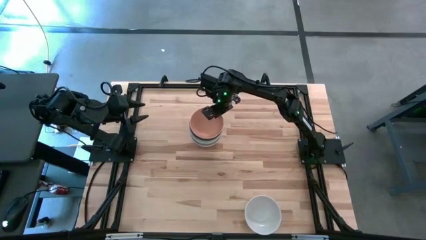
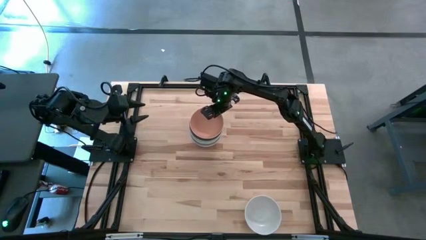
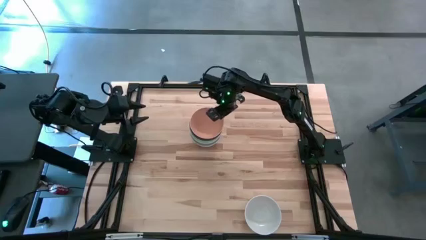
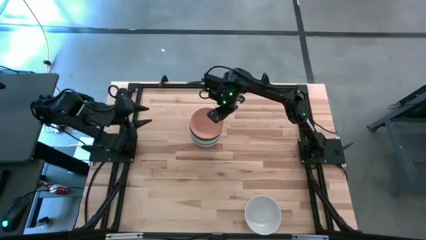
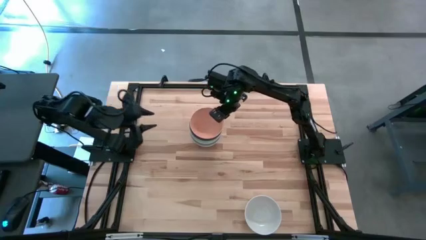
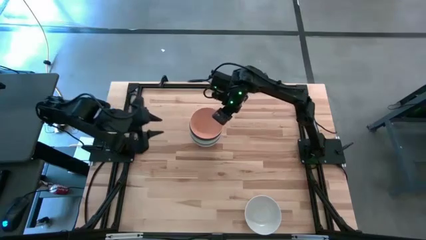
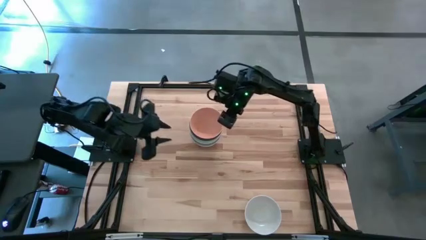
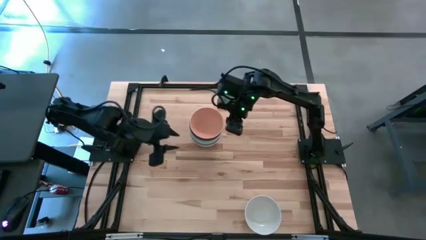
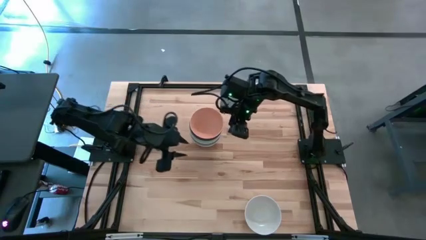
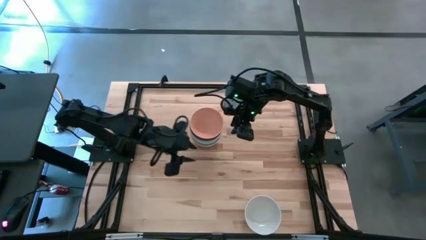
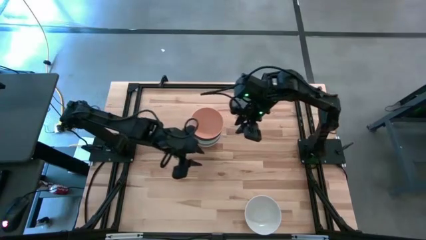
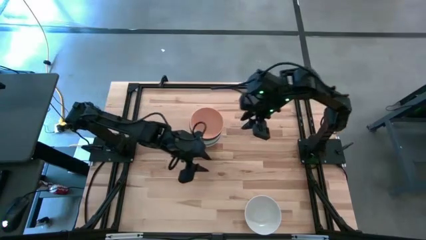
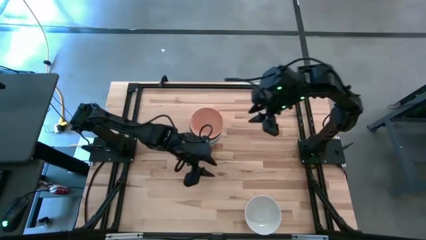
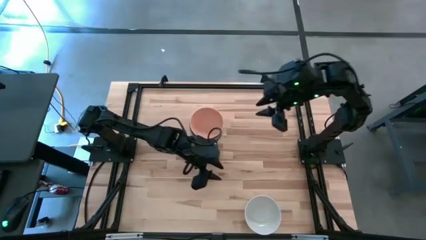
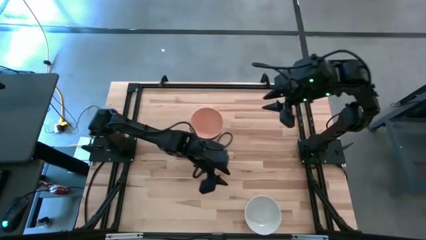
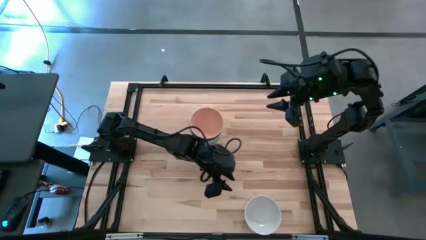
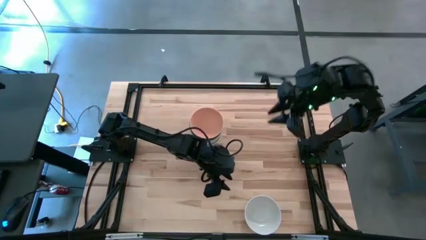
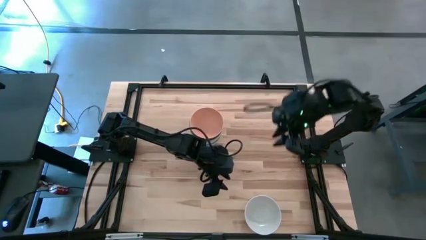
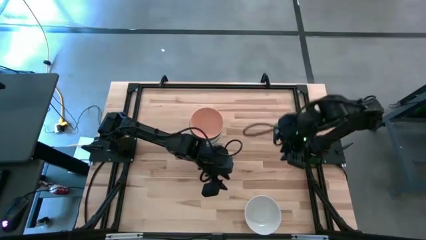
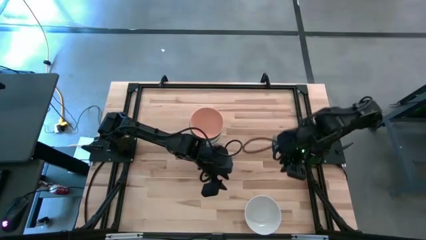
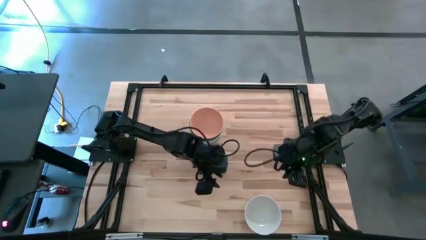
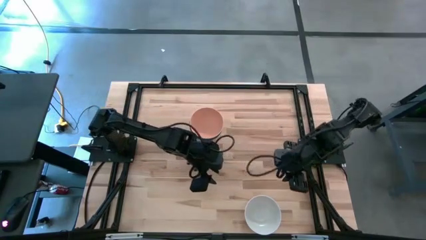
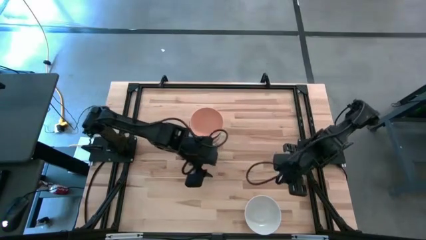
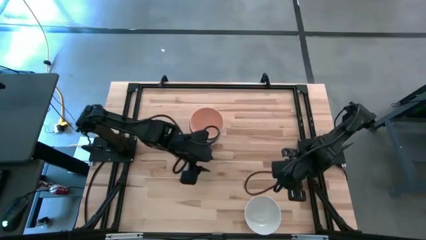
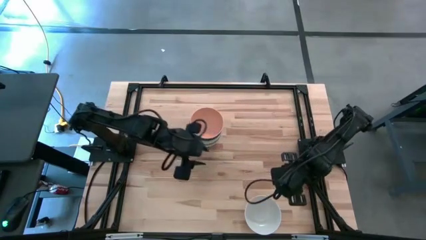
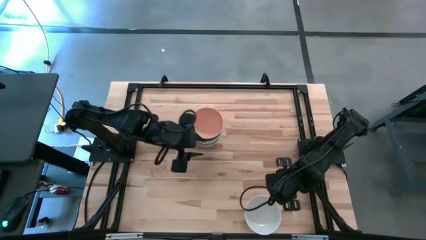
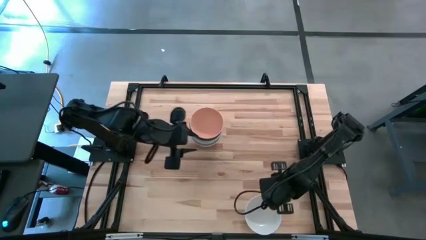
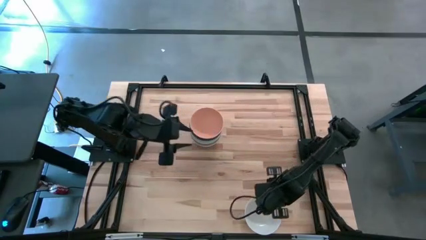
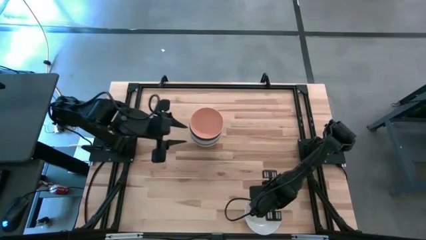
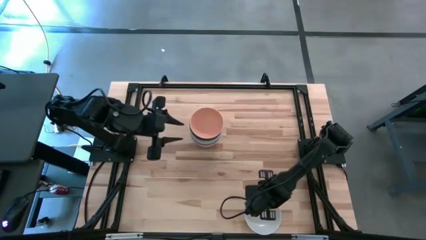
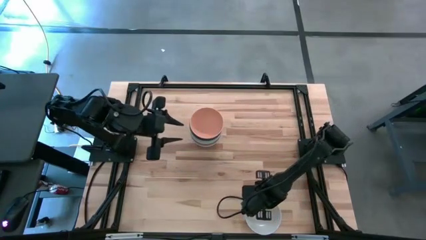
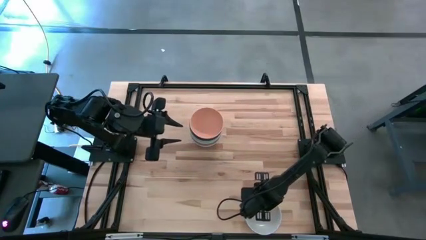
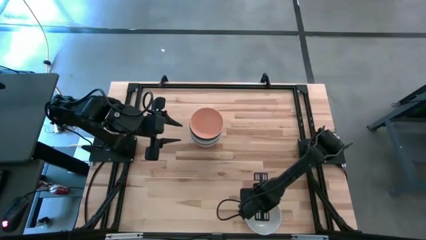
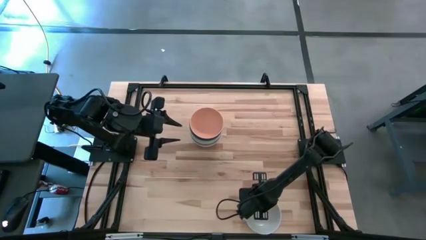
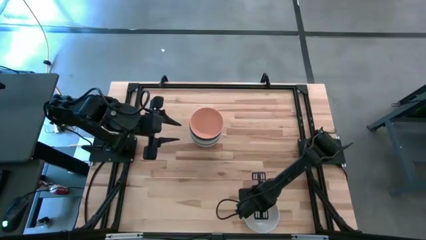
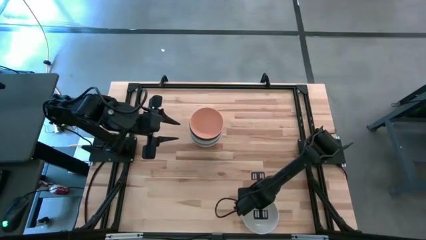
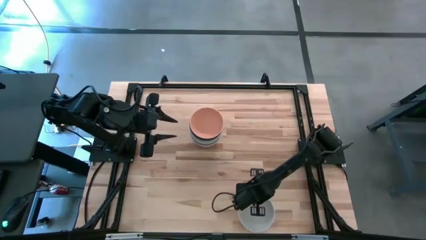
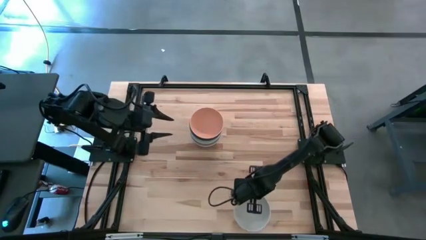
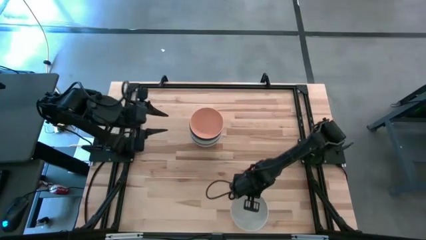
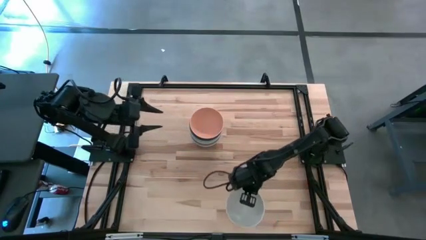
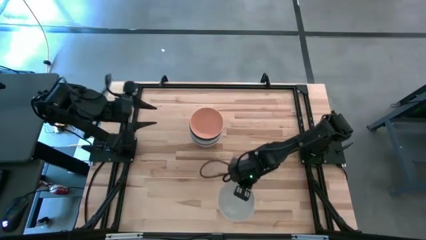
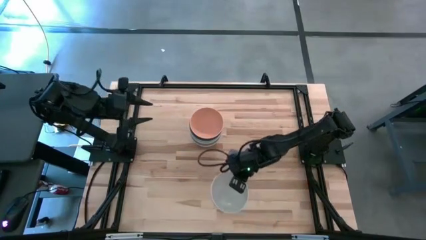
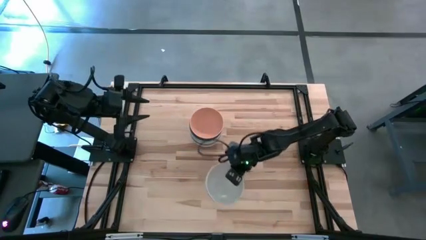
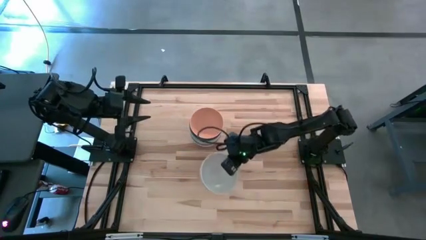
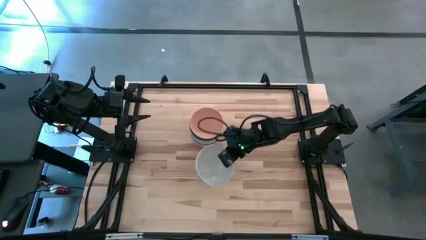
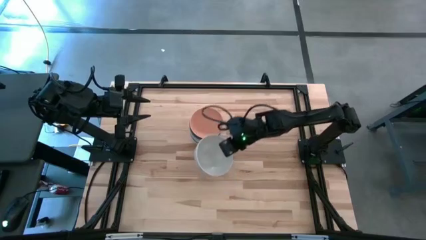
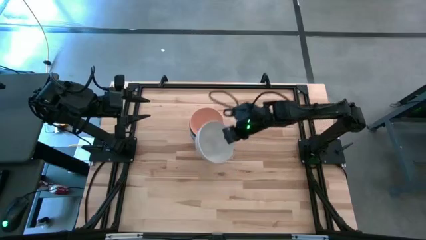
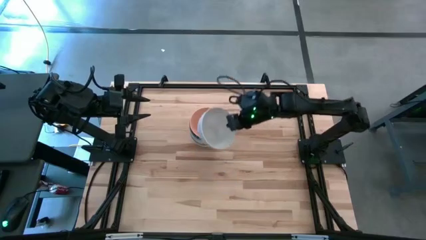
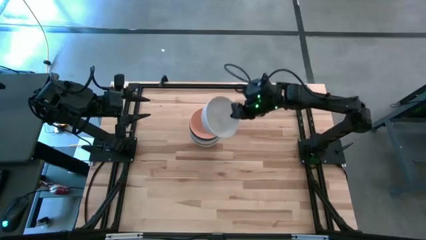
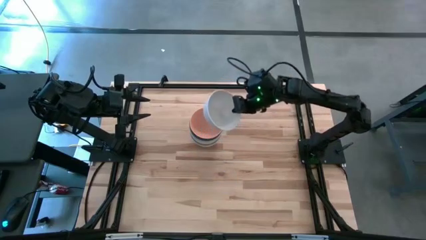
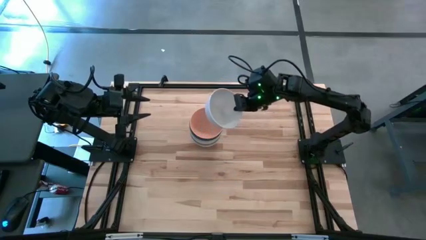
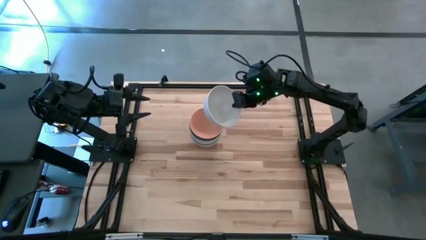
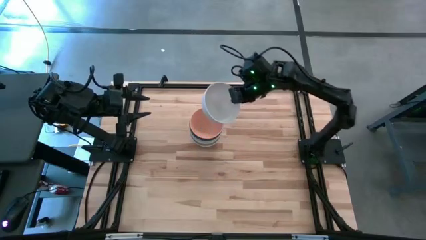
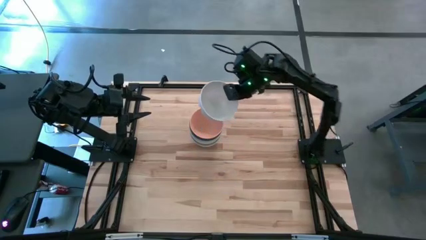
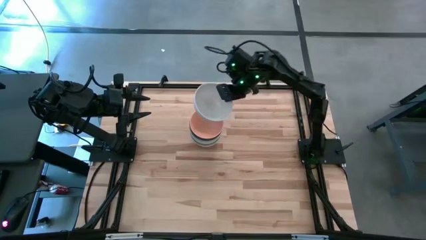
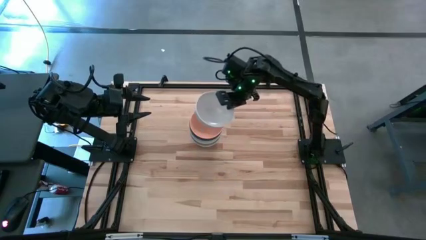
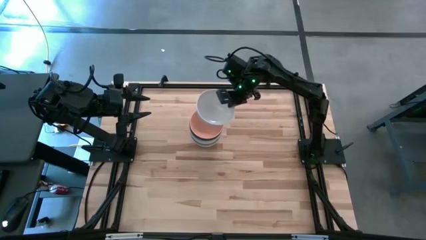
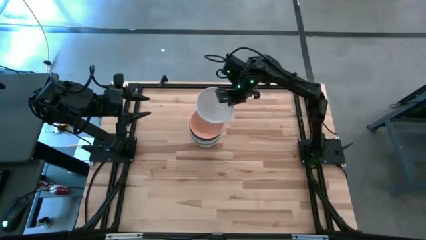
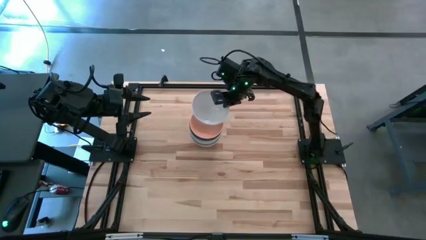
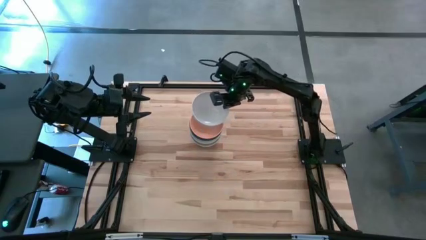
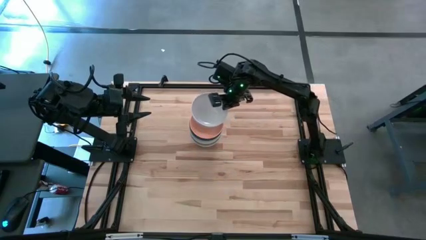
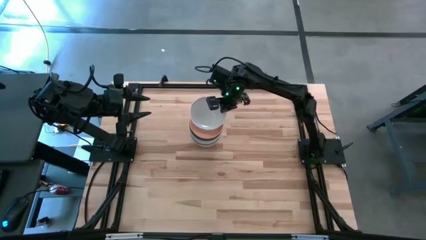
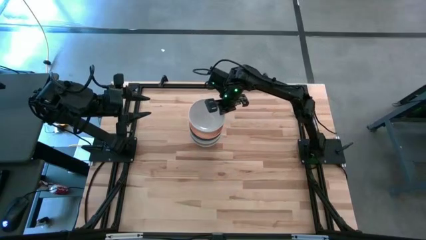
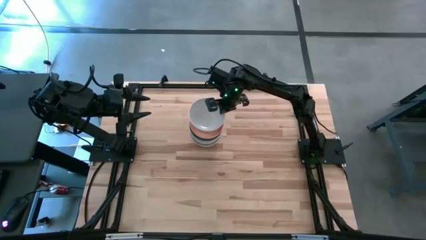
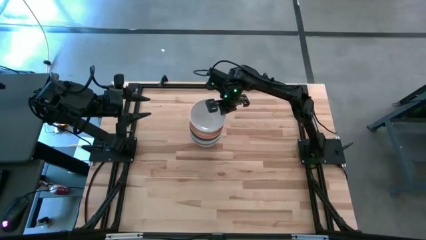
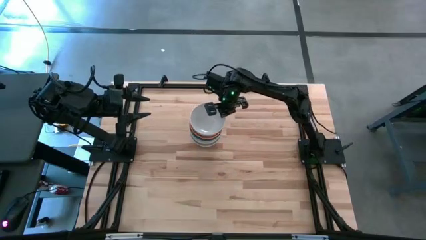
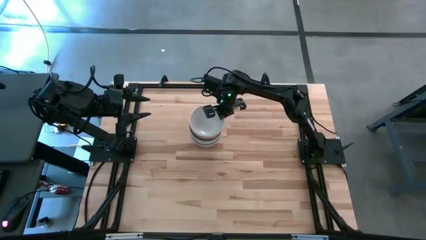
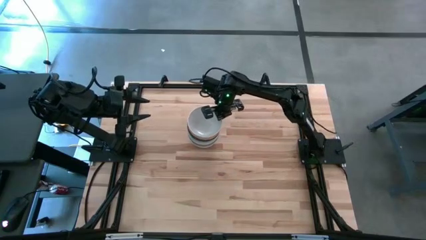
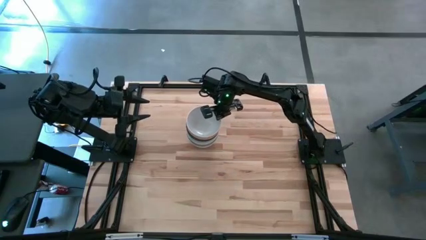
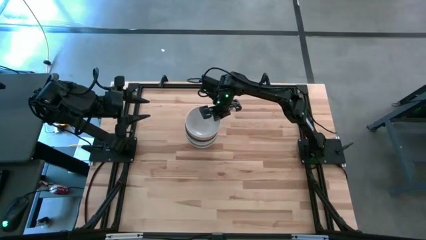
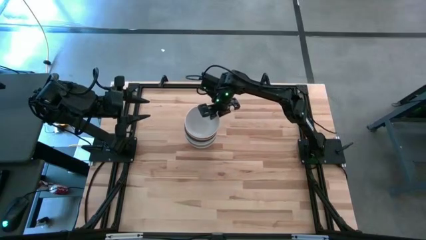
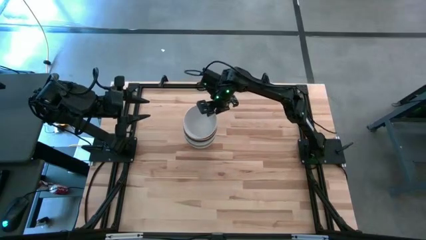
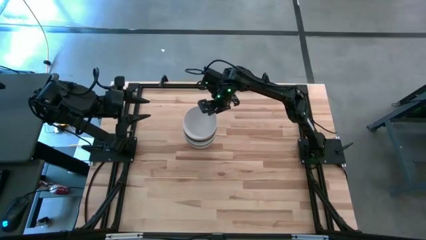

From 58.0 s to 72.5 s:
Task: Nest bowls inside each other
Stack the white bowl on the light orange bowl
